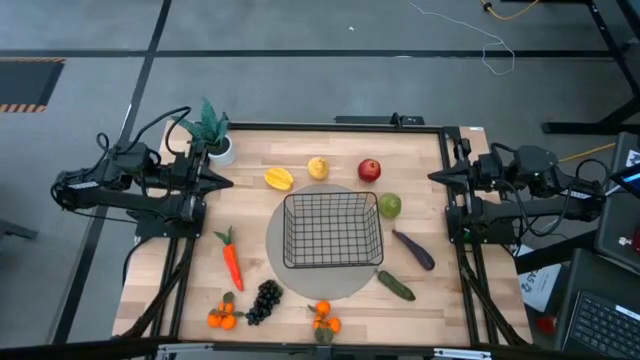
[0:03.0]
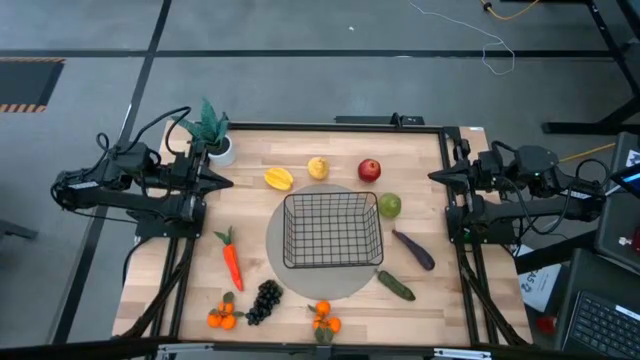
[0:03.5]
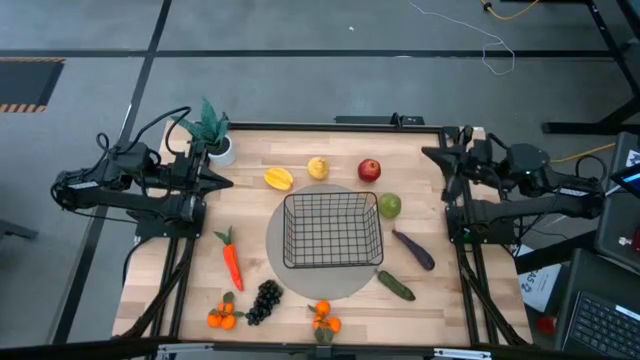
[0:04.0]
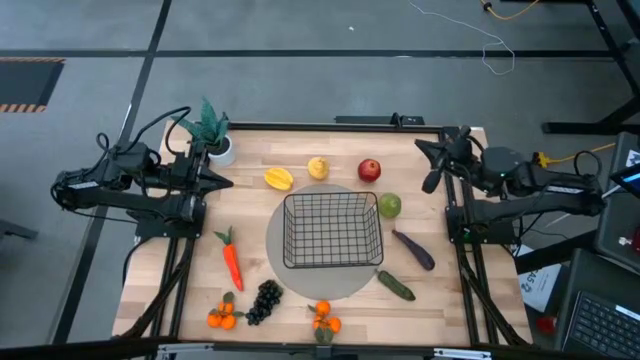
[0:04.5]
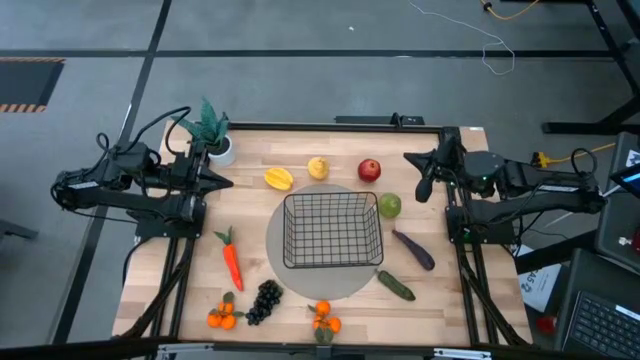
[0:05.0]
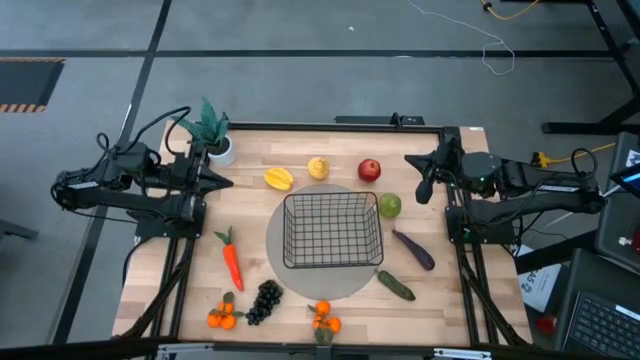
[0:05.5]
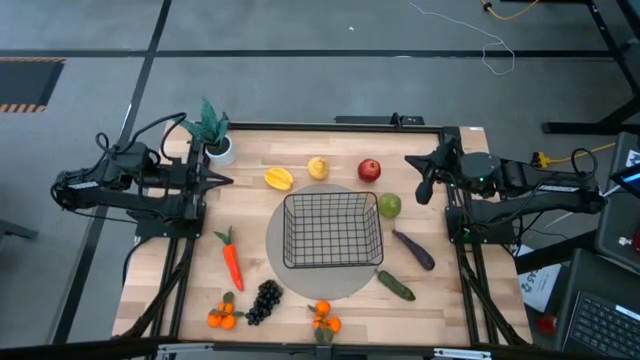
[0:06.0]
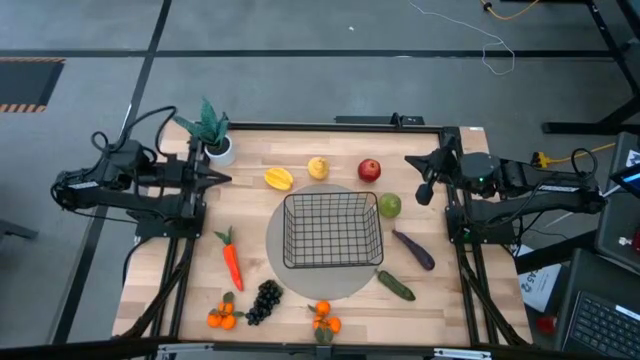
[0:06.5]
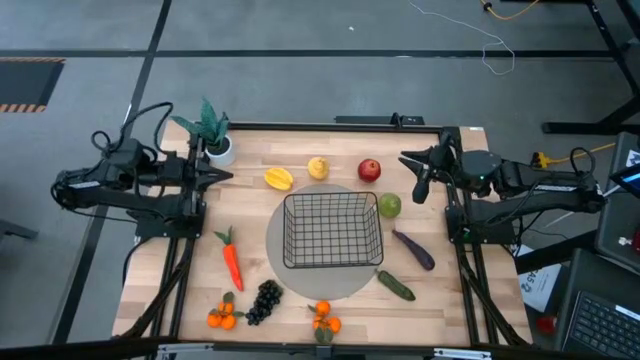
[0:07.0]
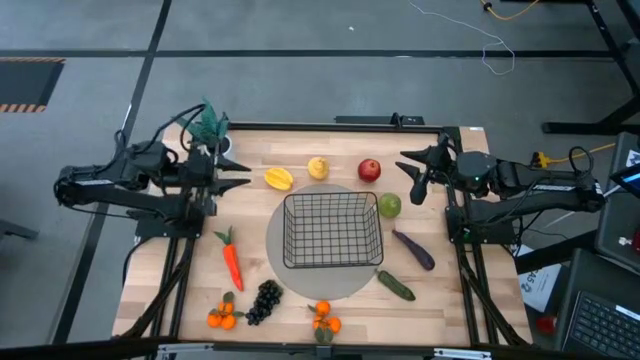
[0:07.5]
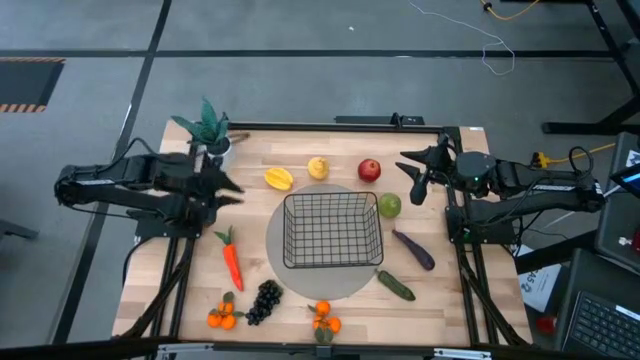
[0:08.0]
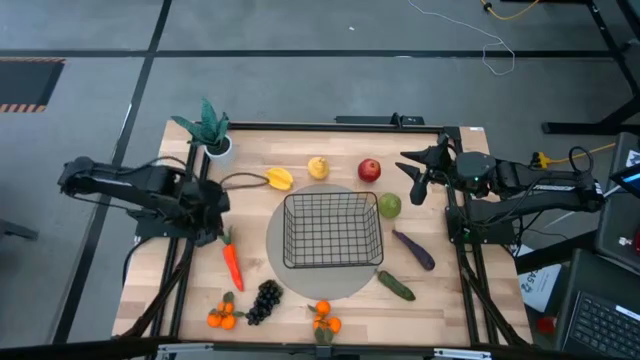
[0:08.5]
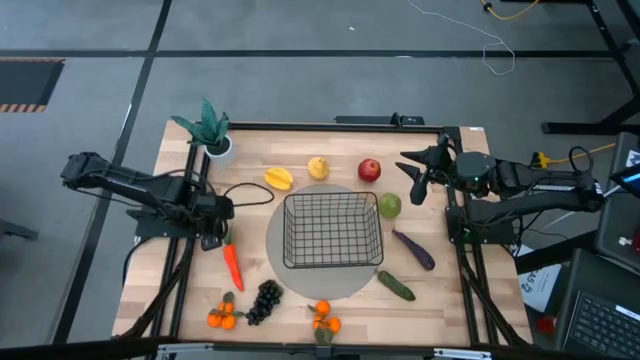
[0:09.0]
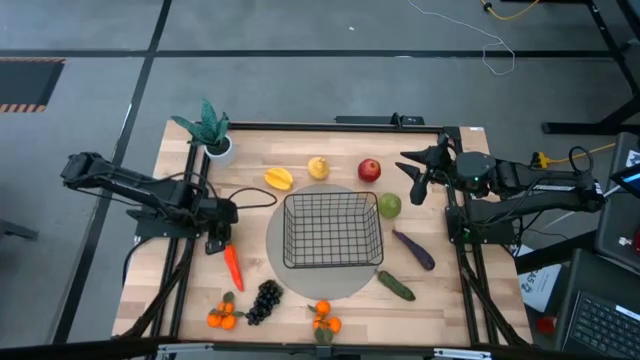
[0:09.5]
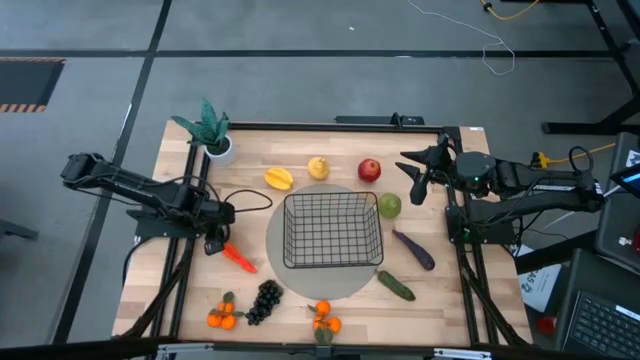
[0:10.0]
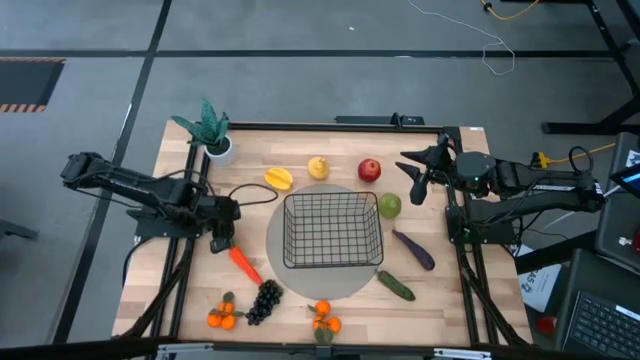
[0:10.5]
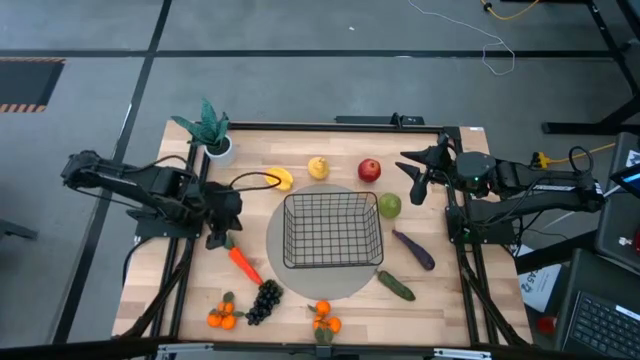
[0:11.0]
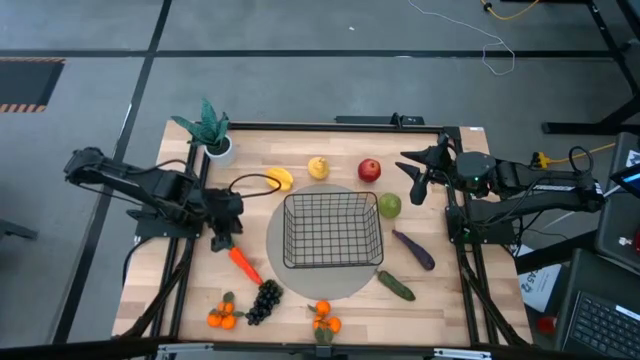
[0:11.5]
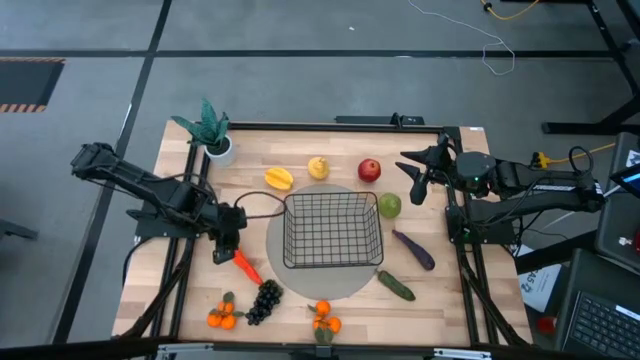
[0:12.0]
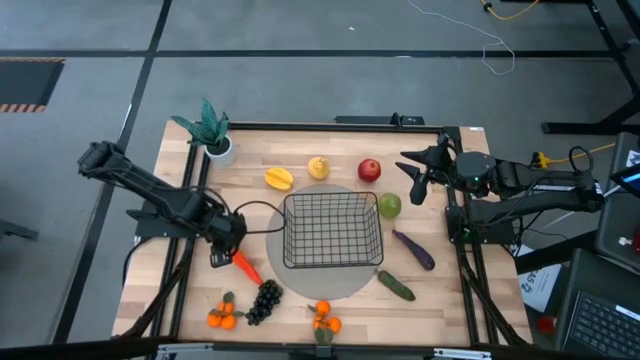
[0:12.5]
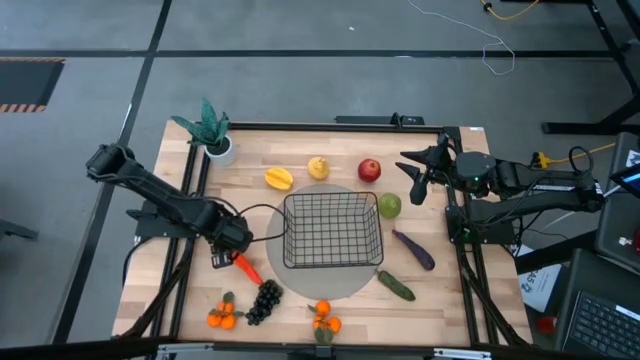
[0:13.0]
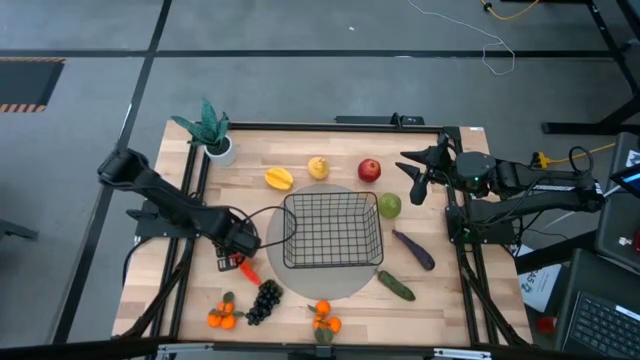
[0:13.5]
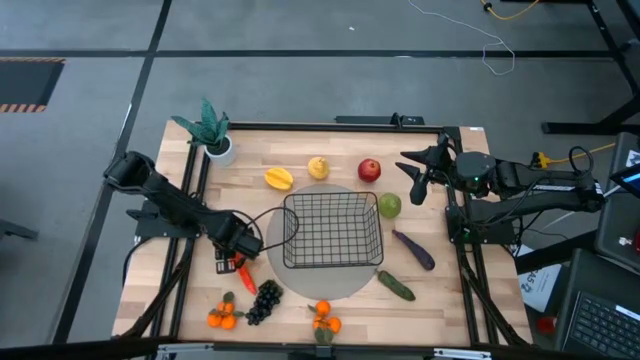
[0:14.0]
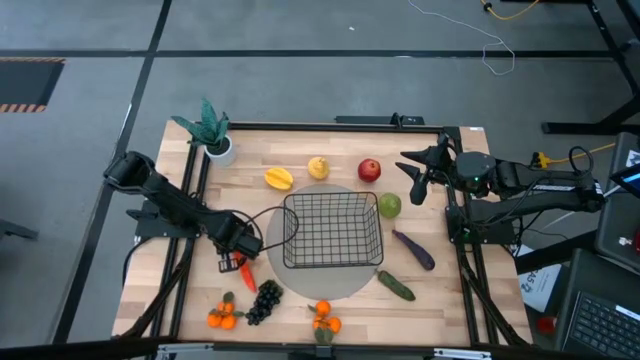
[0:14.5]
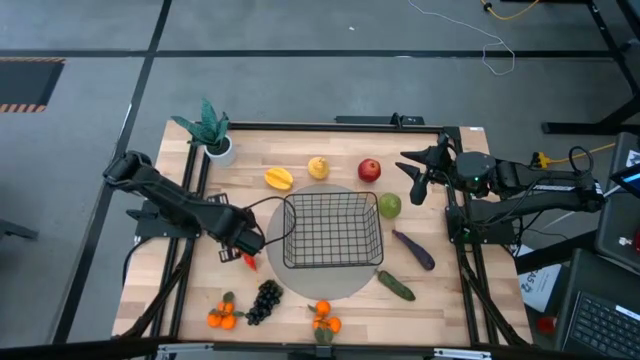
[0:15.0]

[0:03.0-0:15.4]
Task: Build produce basket
Put the orange carrot into the wire basket

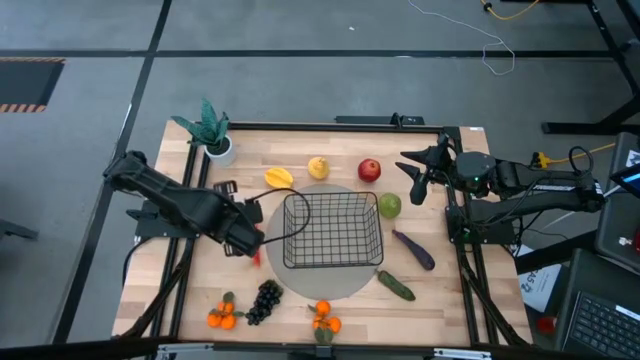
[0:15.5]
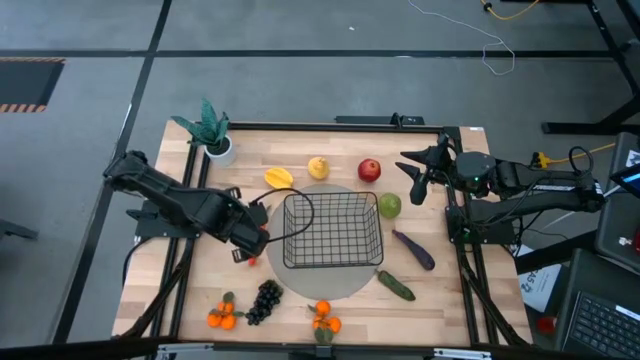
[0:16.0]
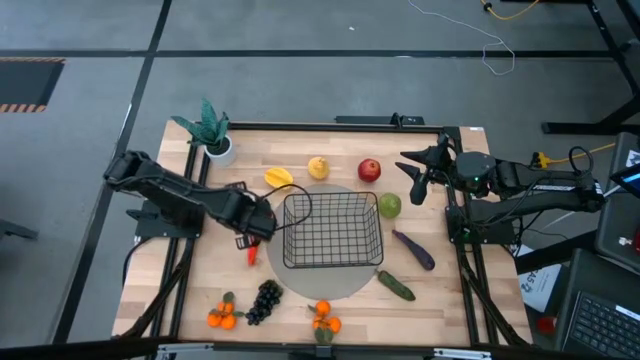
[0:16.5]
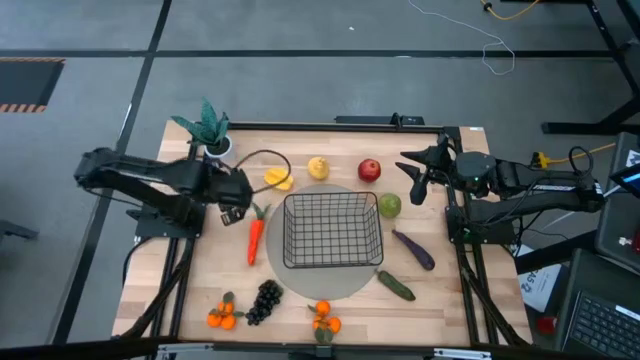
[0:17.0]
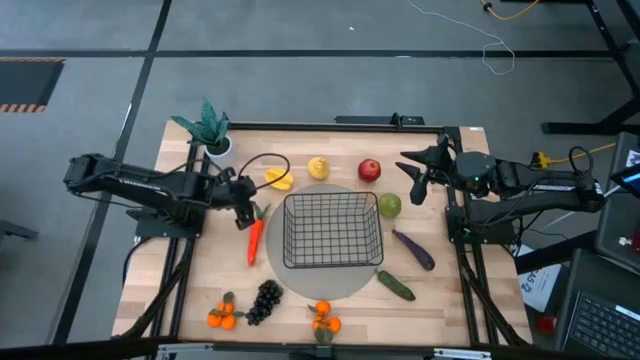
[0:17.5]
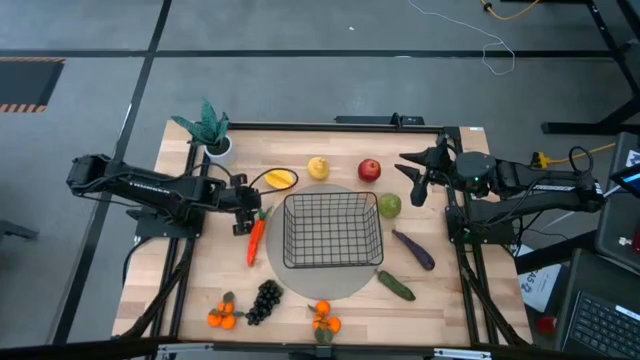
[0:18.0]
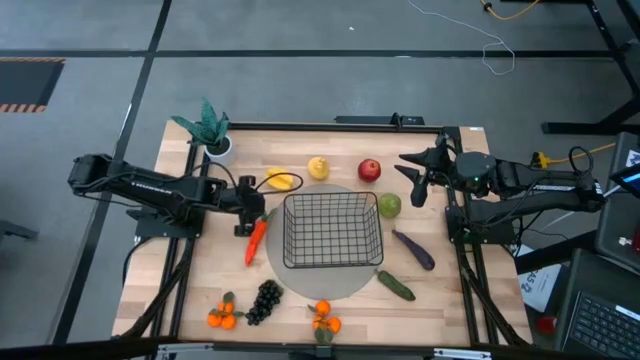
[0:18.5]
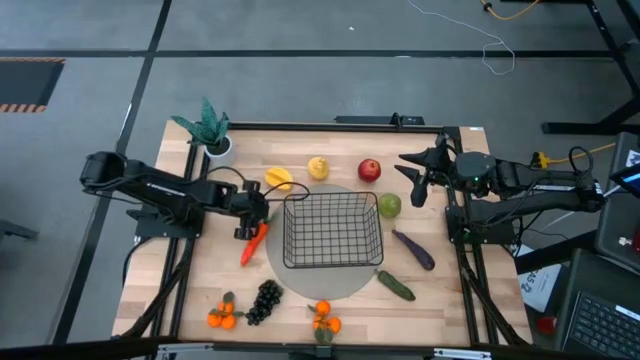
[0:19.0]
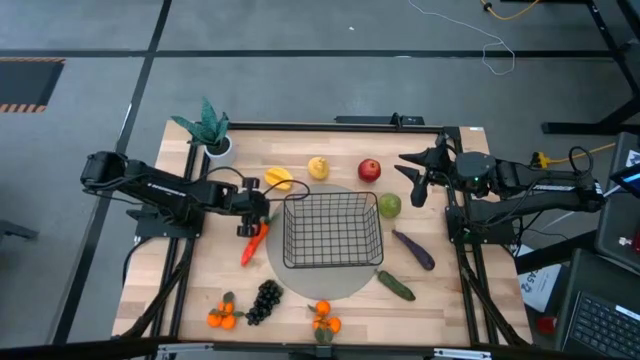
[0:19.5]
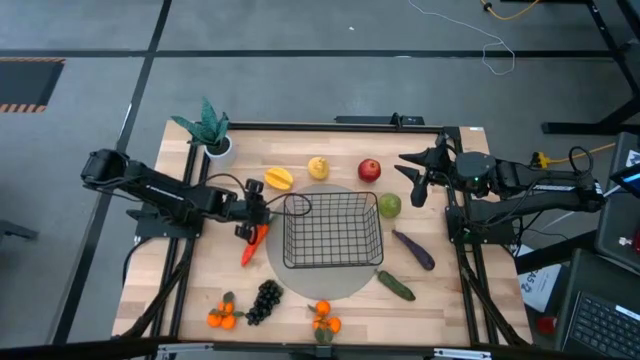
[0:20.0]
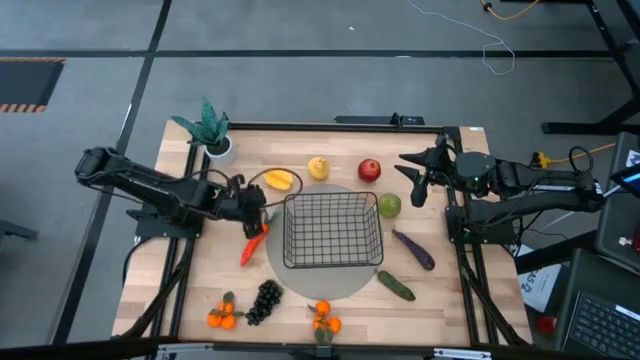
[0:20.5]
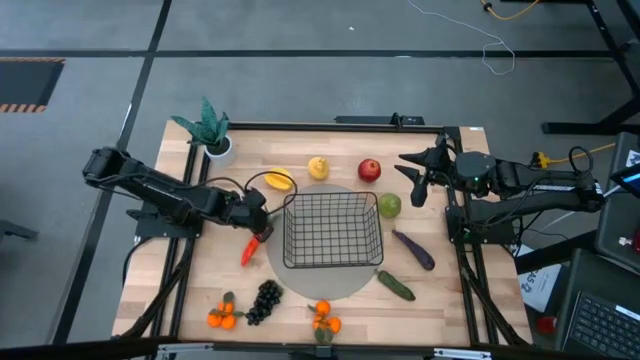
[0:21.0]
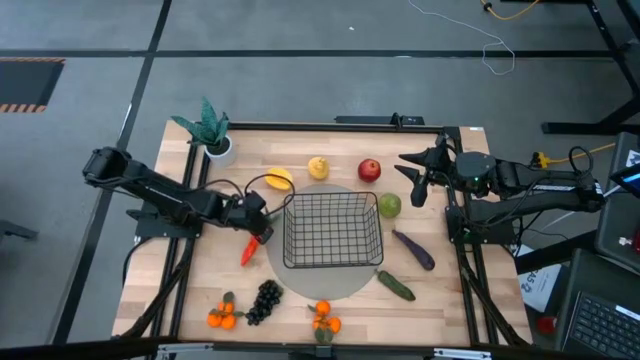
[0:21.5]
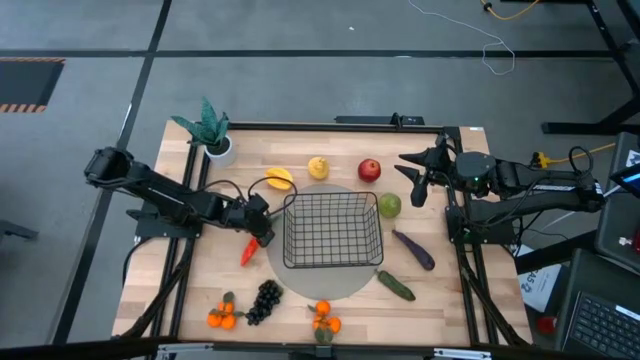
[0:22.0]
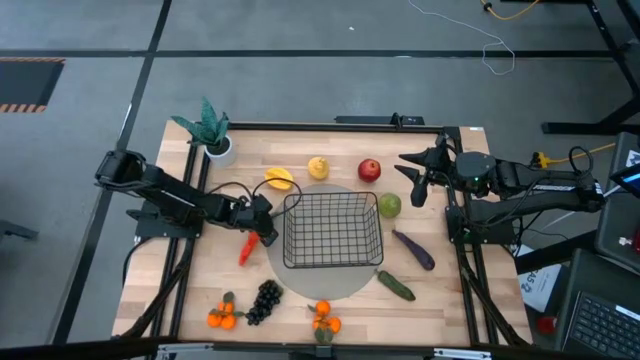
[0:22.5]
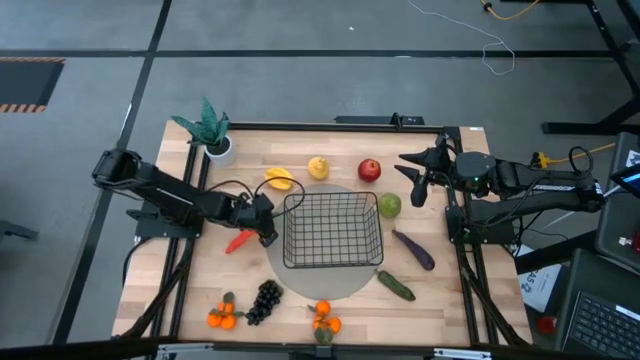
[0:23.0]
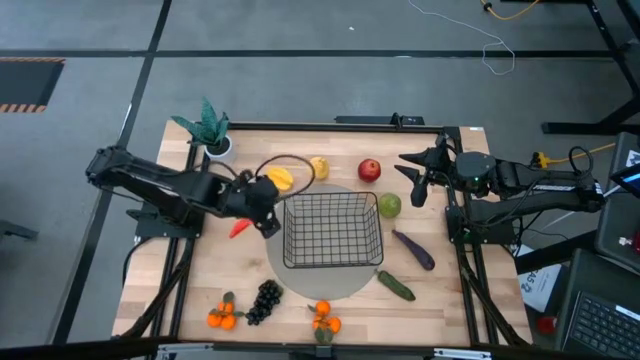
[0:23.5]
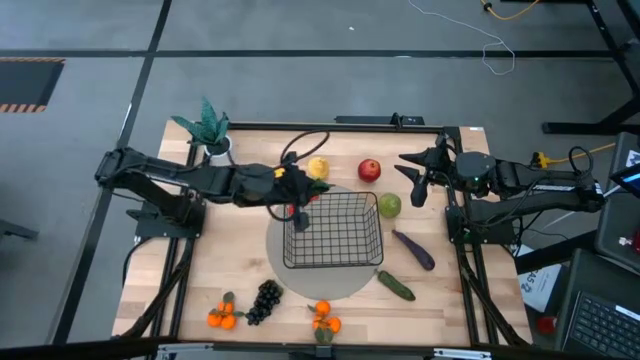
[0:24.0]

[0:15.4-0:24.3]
Put the orange carrot into the wire basket
